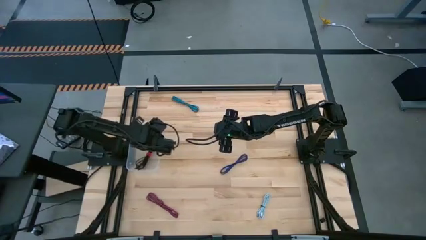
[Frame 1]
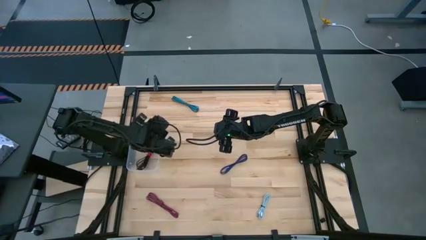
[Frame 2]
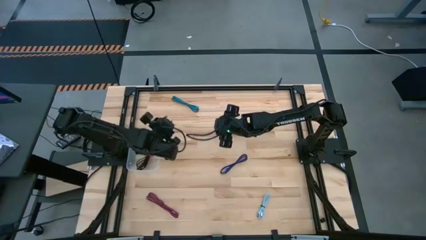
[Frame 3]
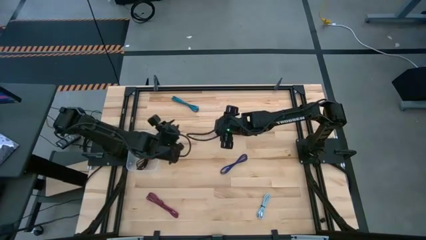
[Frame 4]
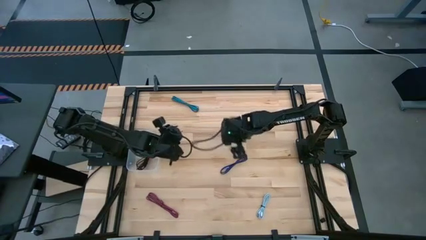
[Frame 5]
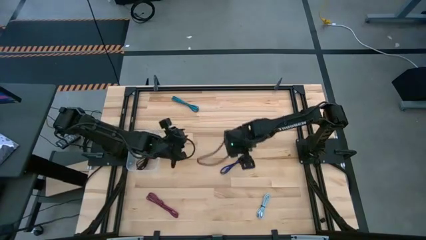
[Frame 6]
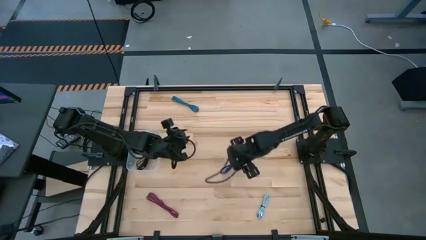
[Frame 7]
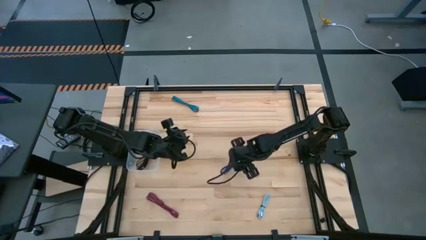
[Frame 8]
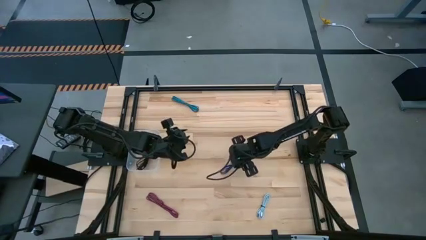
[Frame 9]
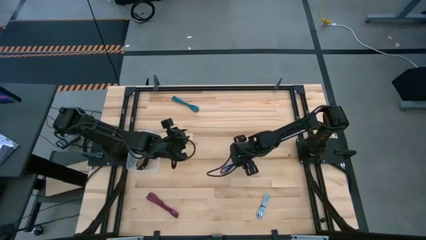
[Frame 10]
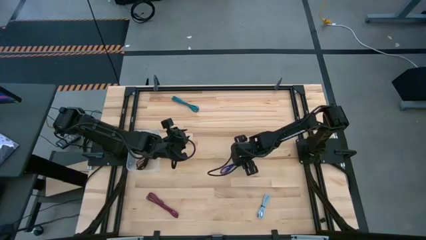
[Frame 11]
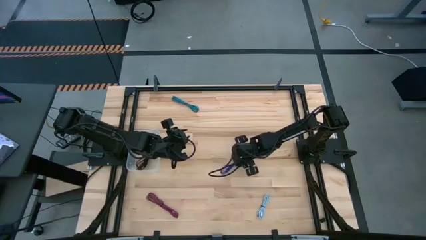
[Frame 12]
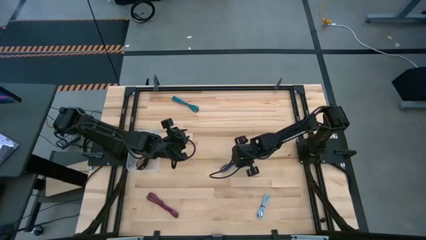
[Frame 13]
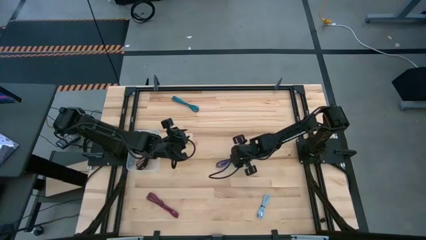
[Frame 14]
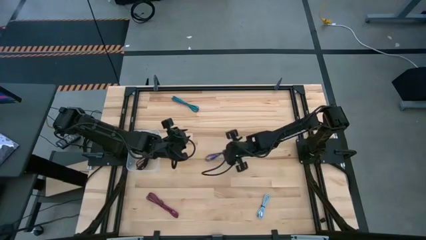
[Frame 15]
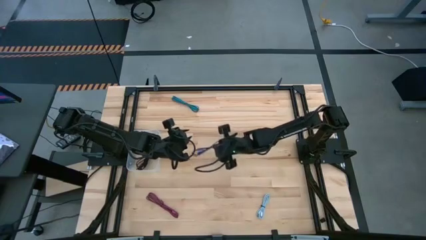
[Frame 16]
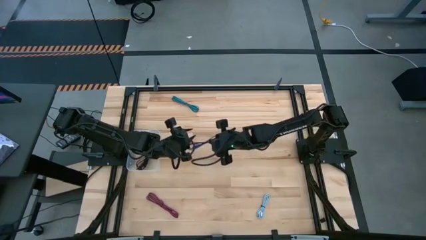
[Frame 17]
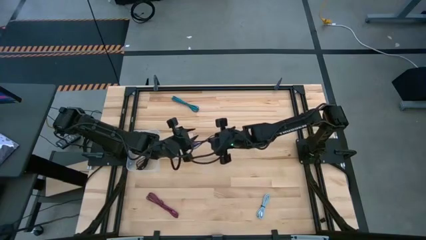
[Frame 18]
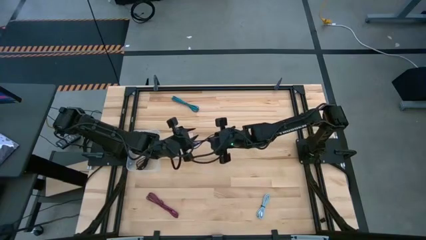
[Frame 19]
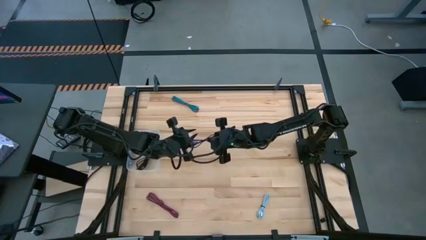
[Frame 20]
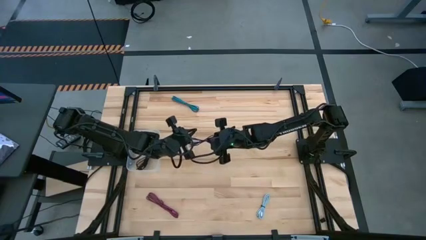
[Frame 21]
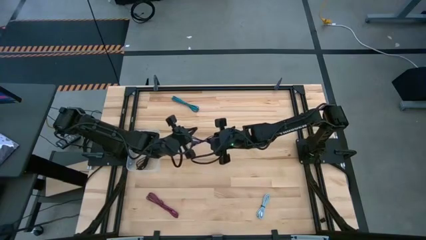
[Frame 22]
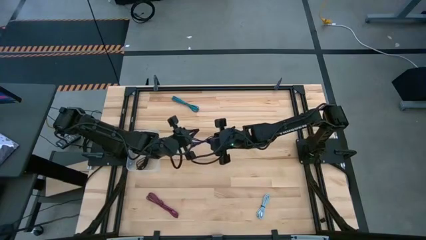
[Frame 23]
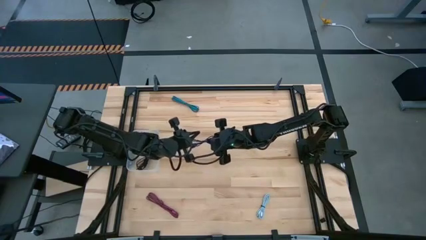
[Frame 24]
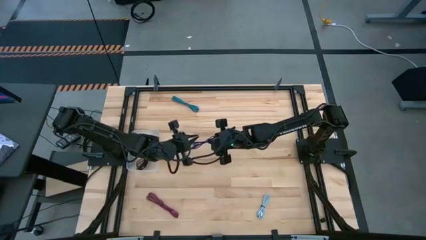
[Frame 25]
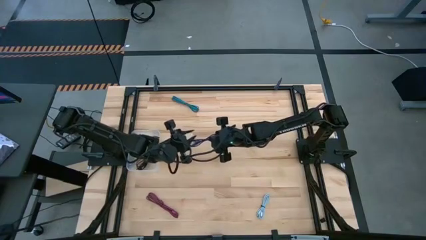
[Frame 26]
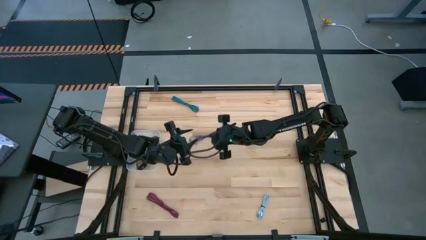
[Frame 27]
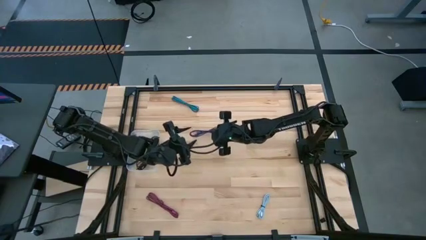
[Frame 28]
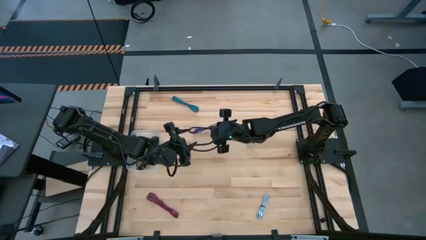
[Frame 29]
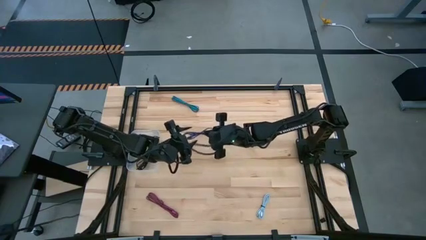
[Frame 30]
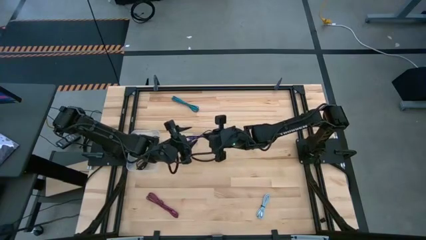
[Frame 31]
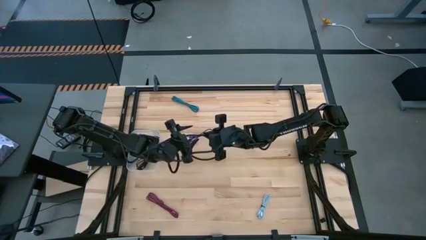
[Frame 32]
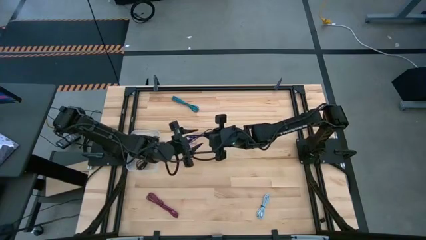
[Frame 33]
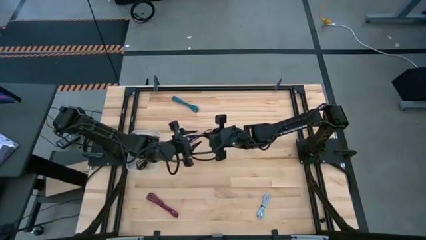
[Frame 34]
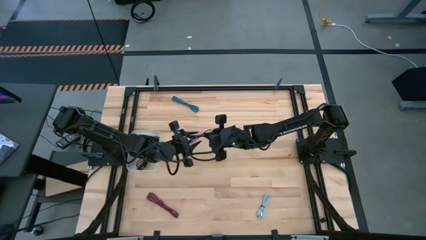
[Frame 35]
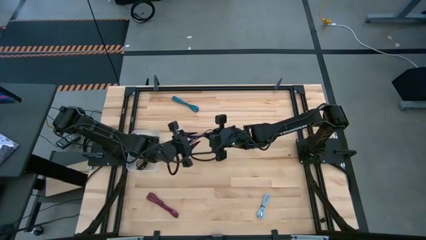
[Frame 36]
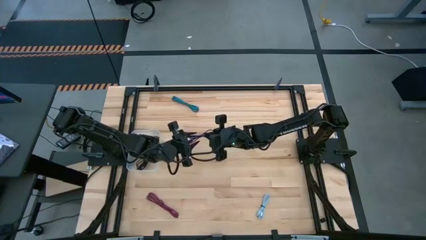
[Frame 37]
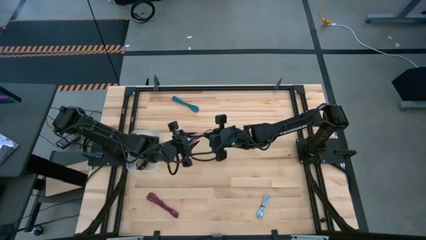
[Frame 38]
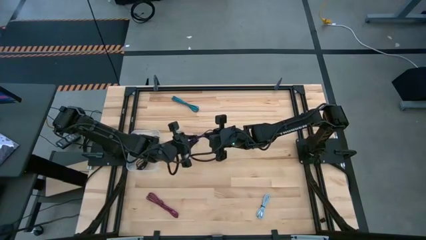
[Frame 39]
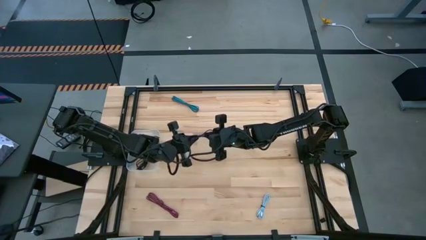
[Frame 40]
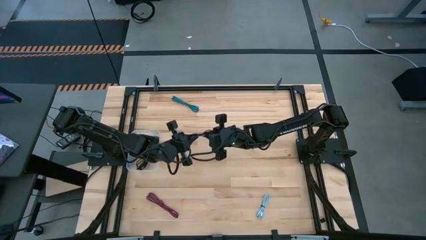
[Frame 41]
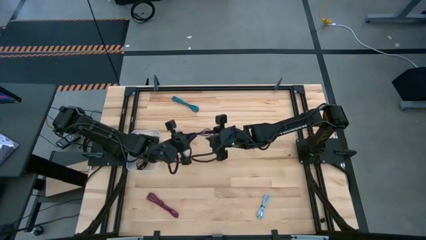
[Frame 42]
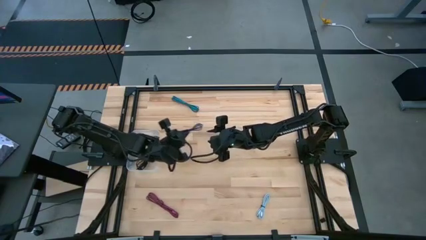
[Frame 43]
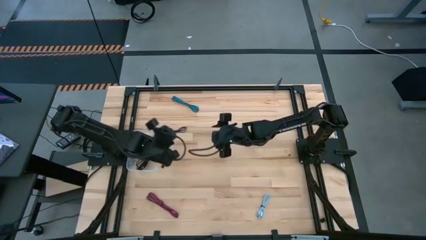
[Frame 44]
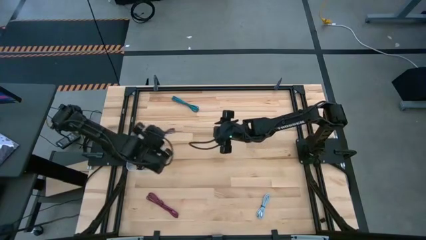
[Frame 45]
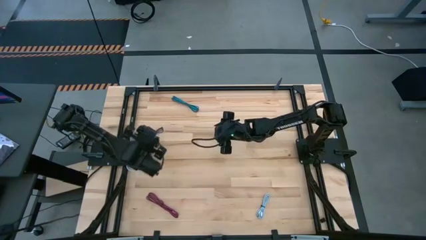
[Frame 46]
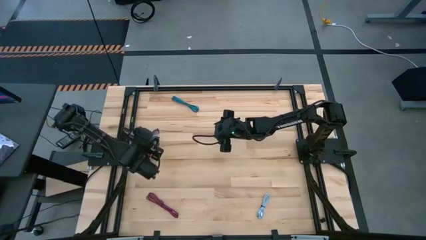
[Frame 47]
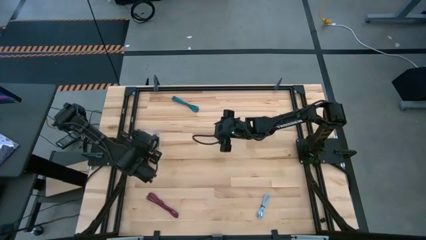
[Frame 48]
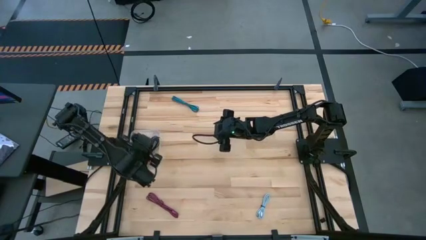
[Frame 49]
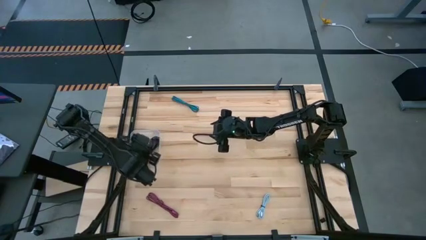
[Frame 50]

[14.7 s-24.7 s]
Task: Pick and place USB-C Cables
Put the purple black charger cable into the transparent bin

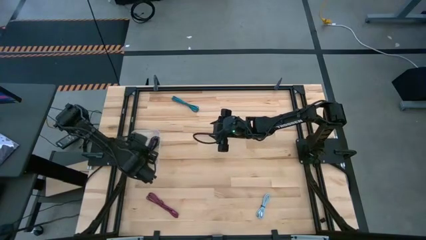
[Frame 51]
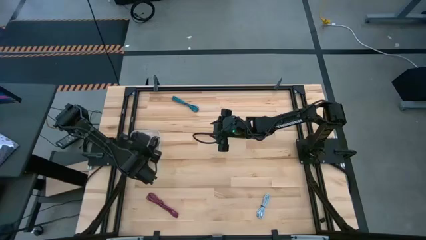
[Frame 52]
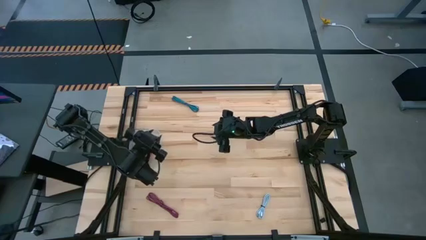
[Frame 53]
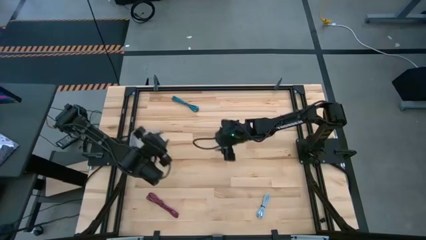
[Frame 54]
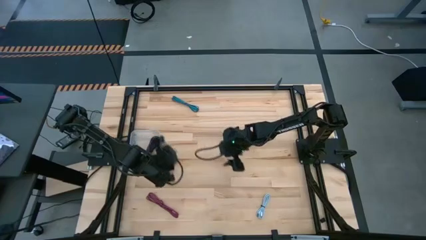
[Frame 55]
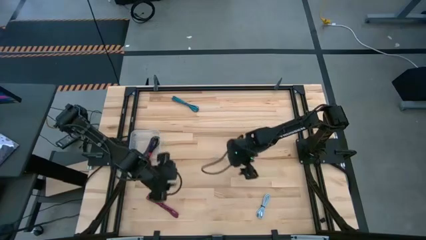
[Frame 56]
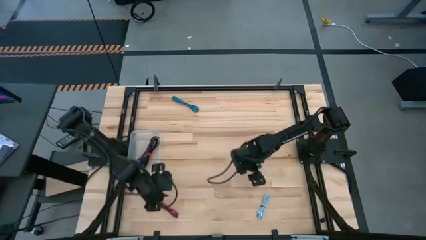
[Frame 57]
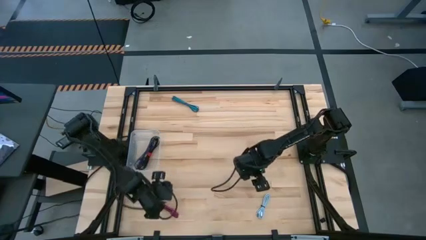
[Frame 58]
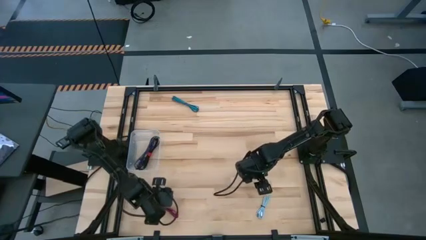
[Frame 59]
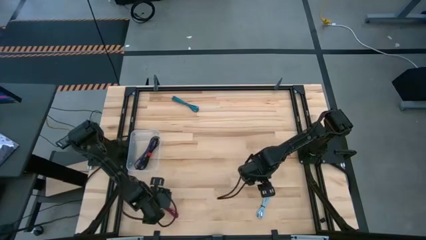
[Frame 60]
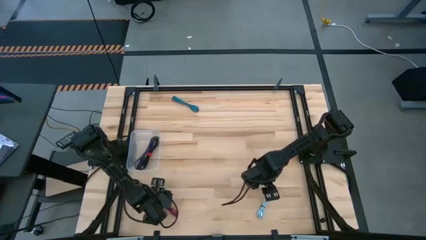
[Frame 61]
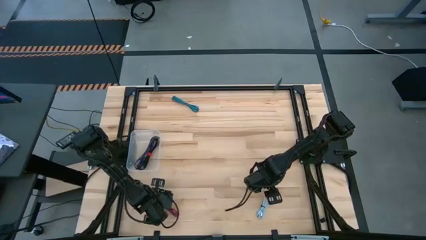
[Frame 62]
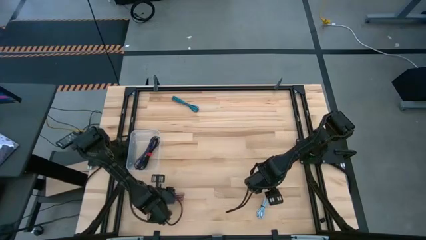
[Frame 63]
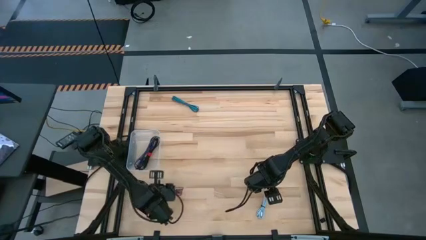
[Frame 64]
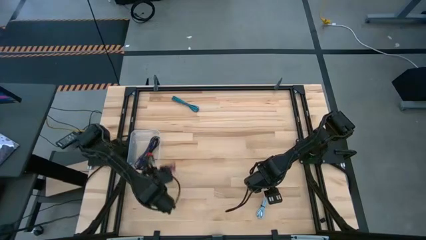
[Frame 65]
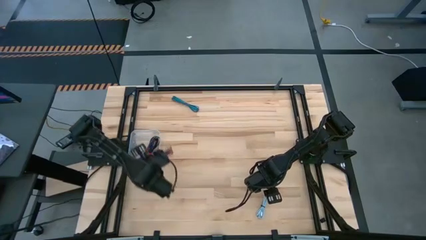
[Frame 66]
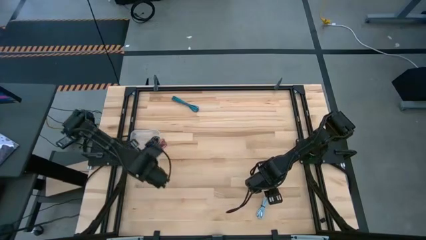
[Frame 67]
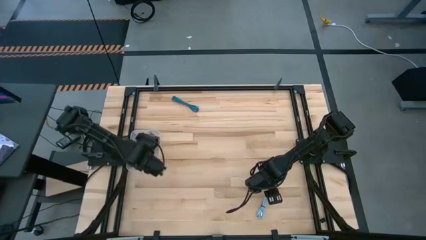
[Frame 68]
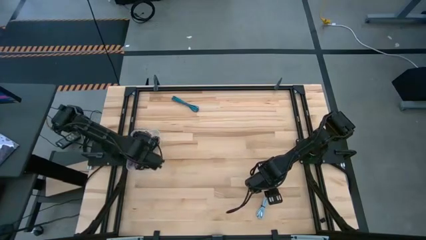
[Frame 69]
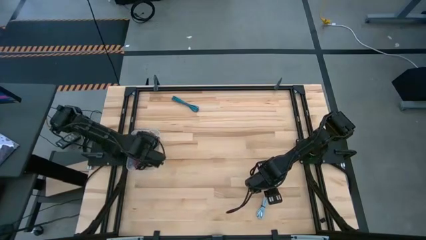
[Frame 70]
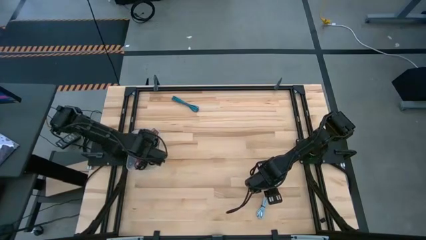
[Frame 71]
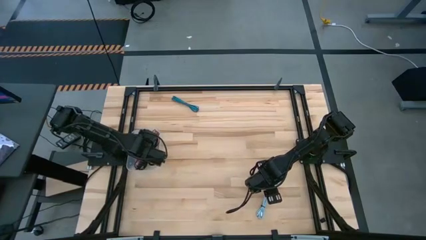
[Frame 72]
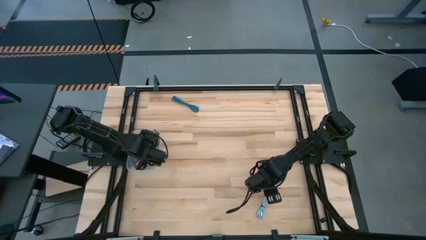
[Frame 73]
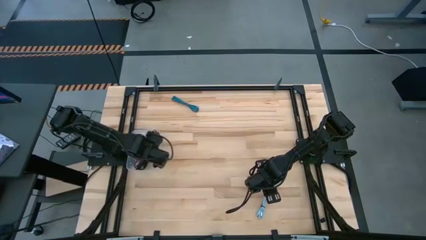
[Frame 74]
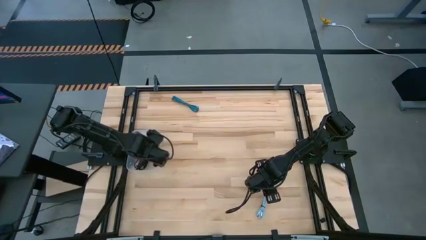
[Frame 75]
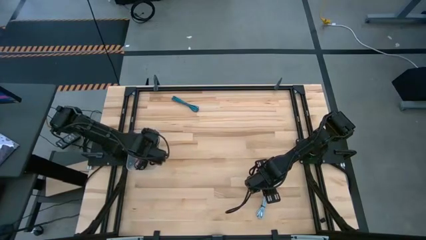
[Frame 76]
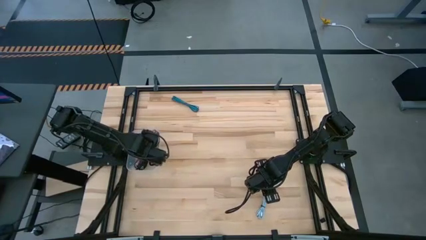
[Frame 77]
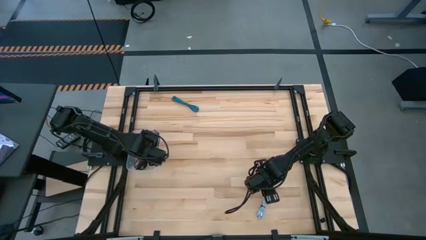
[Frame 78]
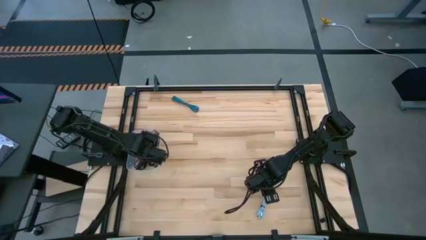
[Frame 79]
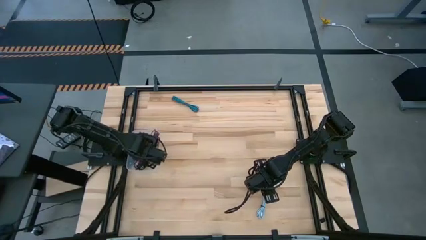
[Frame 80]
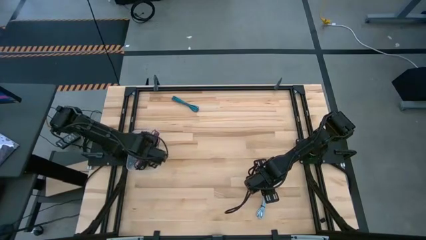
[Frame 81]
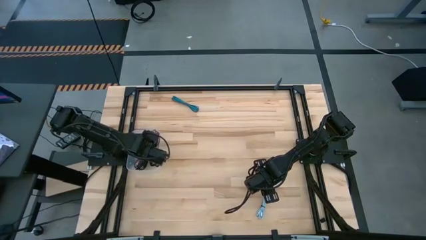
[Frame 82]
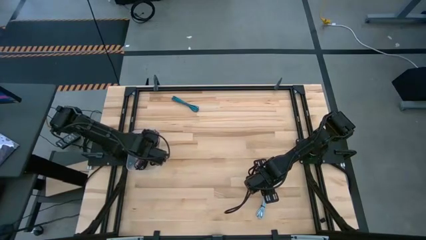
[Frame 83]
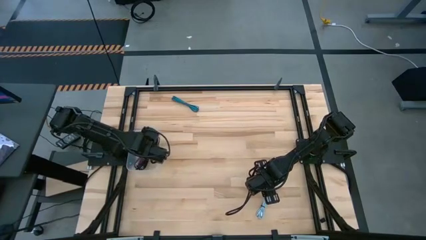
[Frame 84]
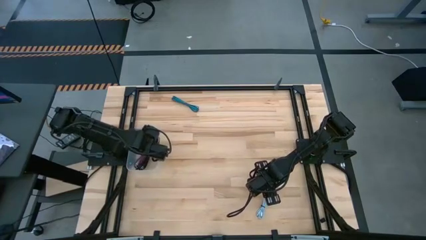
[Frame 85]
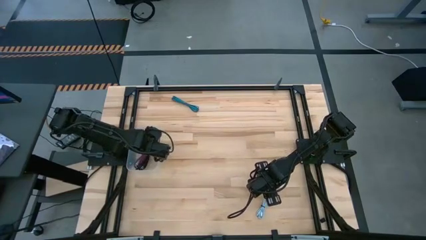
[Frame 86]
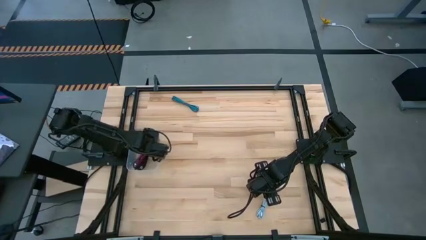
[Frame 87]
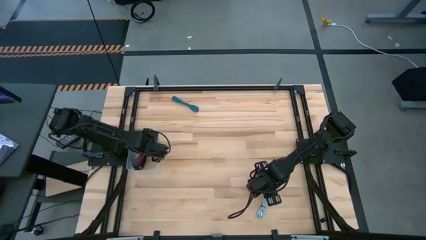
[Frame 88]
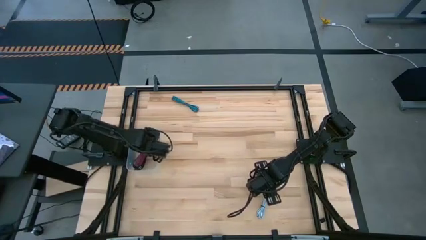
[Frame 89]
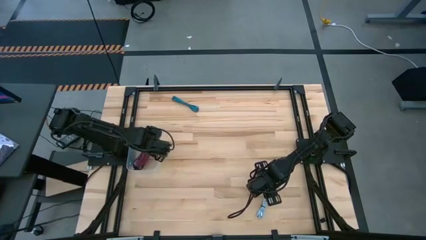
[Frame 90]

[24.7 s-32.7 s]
Put the pink black charger cable into the transparent bin
